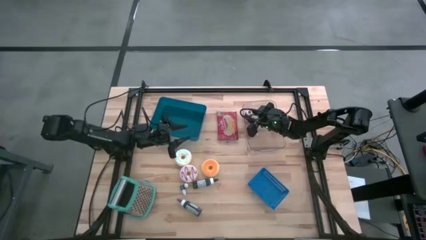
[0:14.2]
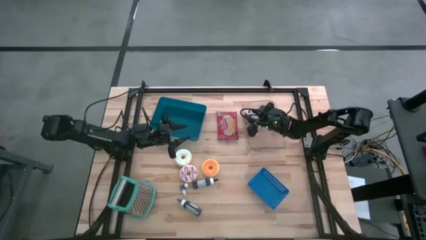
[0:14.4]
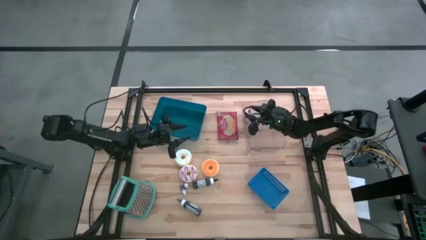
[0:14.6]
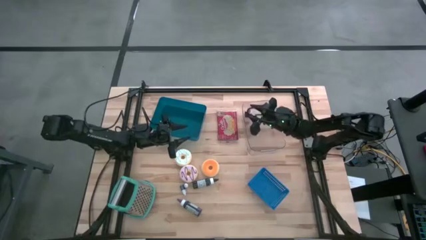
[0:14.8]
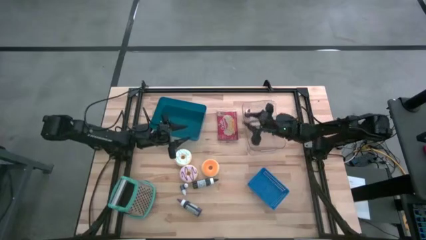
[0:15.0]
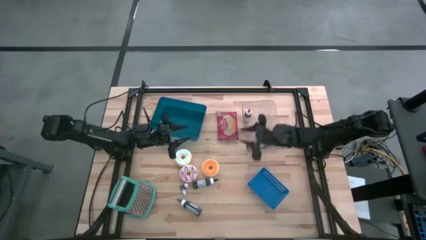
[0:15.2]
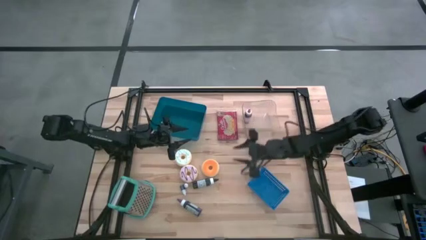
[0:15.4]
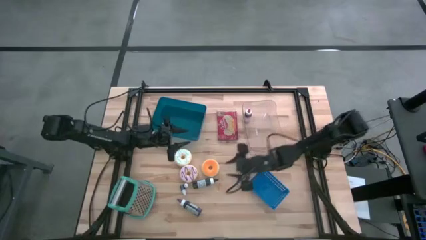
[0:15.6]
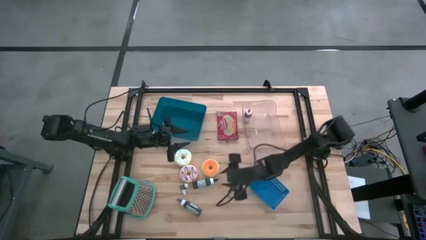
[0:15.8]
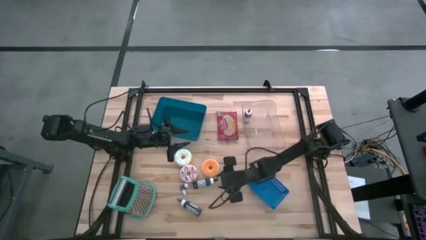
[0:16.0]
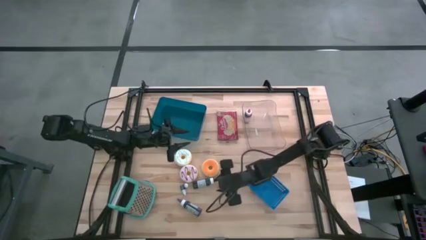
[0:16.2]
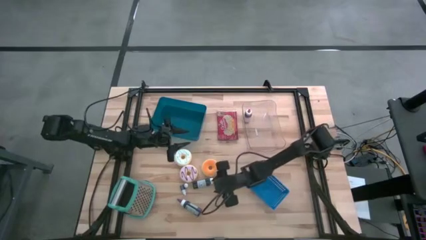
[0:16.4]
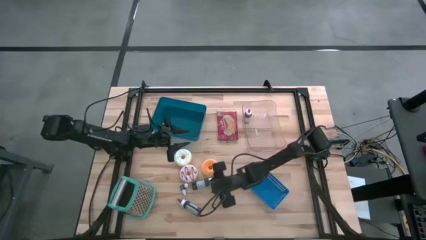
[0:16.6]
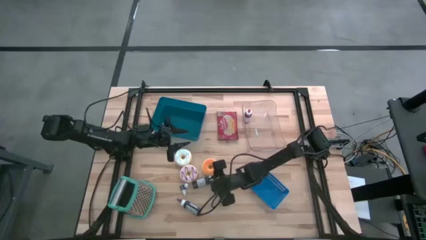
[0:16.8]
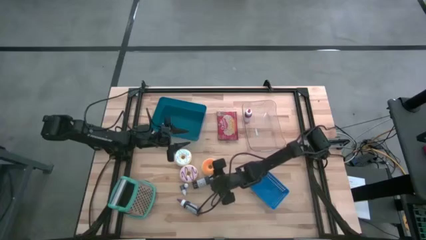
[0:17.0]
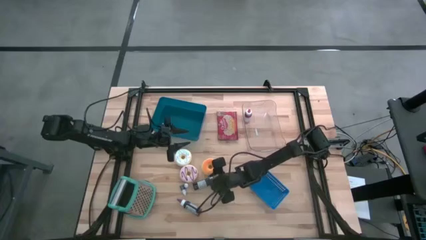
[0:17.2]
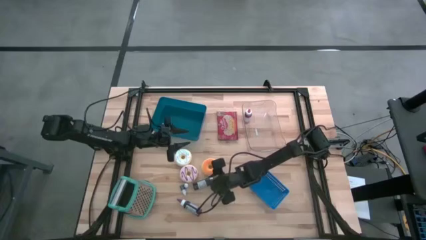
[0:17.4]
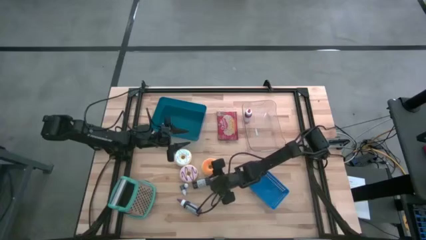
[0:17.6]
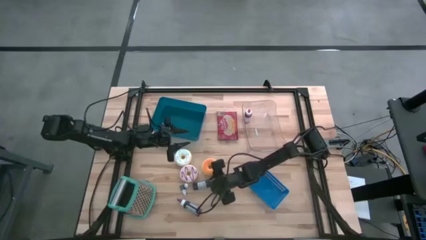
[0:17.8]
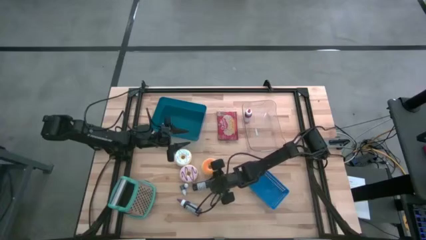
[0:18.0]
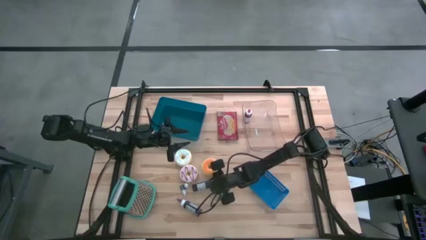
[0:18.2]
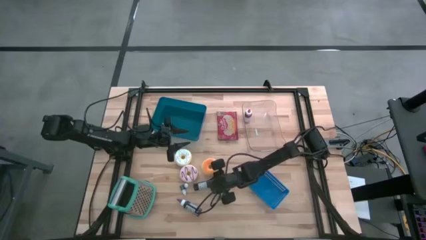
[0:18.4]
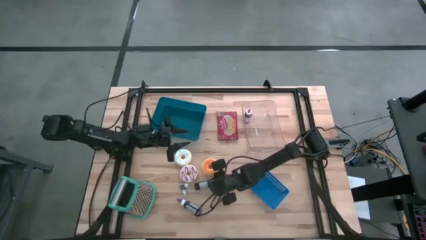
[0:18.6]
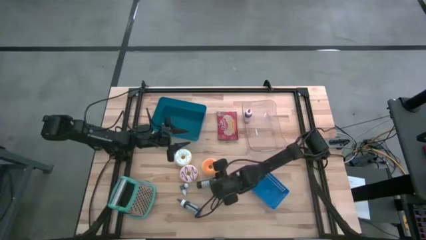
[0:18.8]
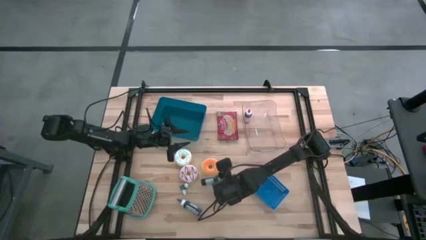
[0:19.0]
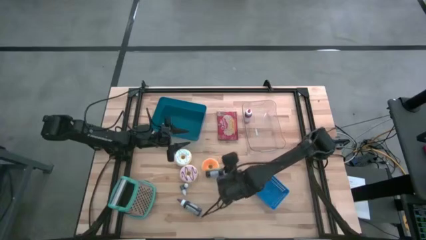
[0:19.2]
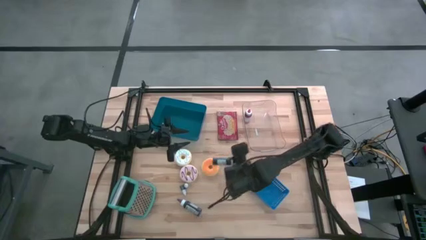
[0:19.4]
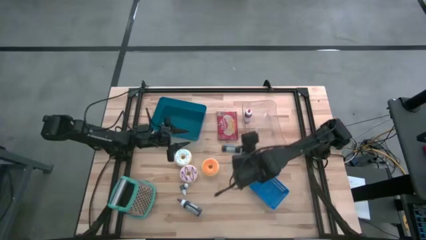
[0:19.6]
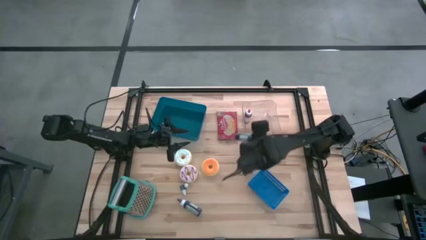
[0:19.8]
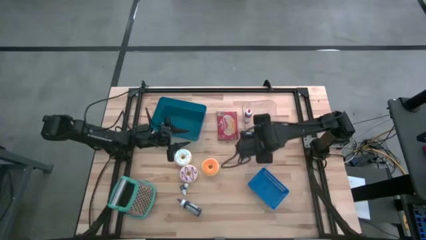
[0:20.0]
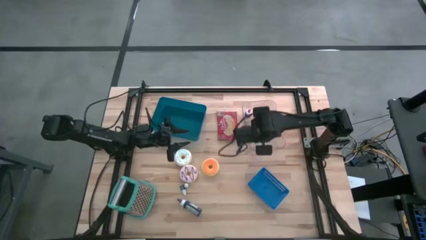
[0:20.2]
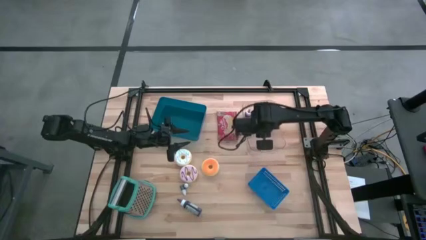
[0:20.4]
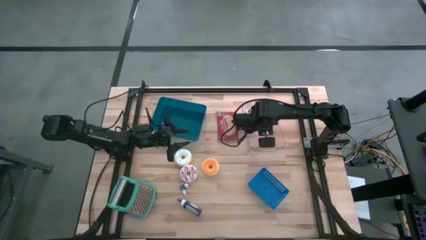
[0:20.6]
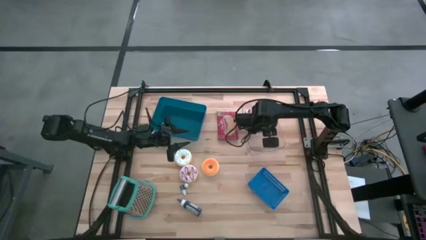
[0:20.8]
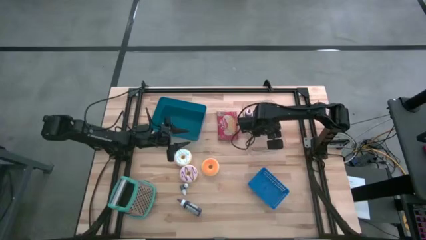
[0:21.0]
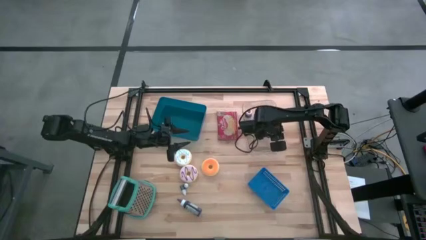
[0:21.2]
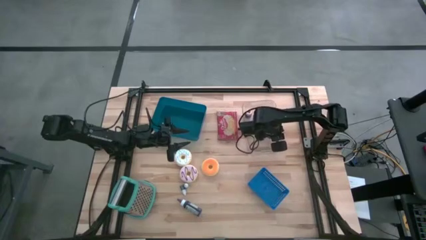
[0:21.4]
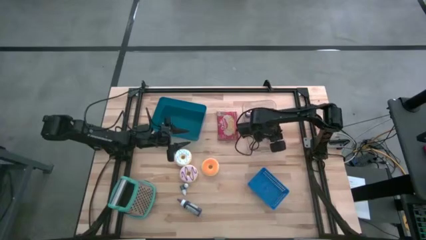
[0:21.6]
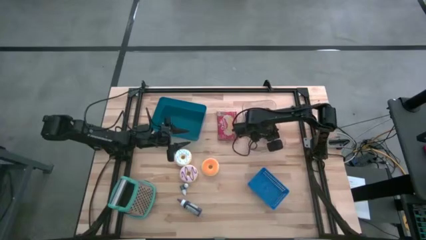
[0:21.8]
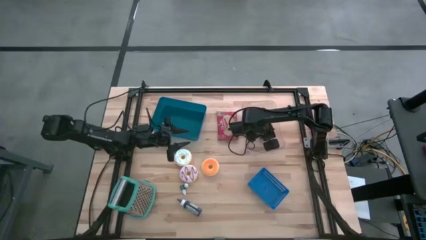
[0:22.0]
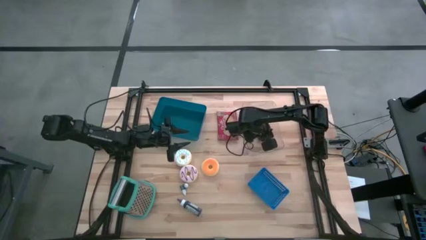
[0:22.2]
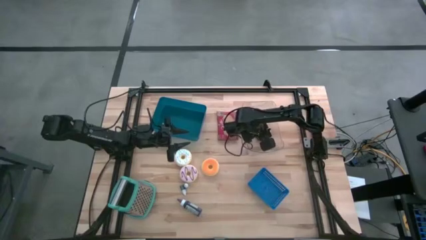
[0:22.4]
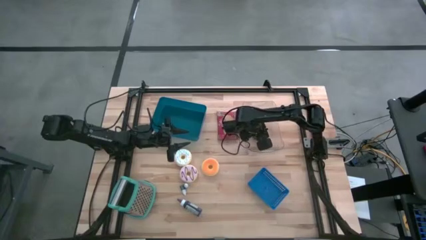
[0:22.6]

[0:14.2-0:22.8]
Task: Pick & Place Food Item
Put the black food coloring bottle into the transparent bin

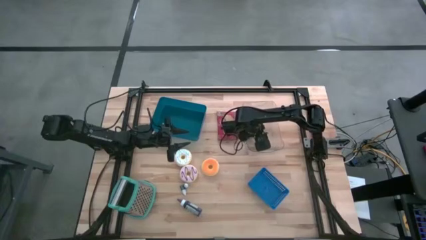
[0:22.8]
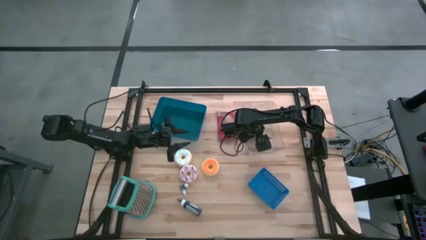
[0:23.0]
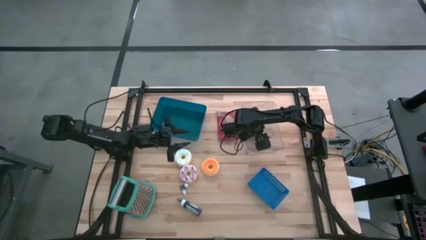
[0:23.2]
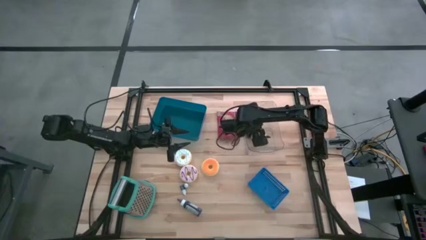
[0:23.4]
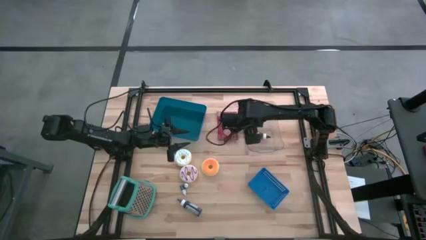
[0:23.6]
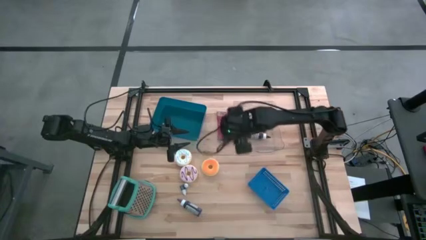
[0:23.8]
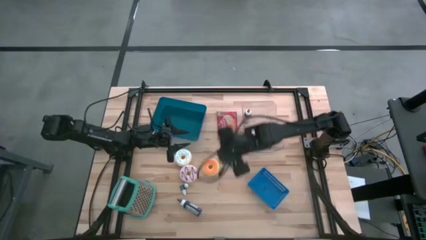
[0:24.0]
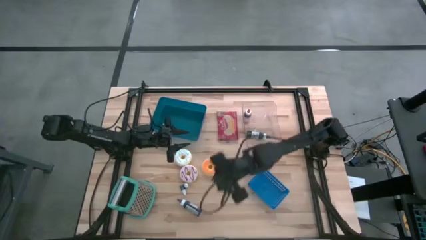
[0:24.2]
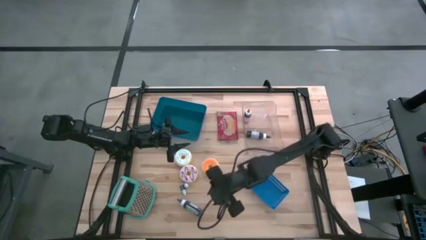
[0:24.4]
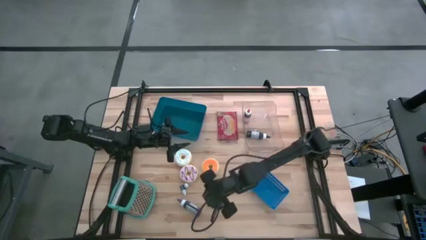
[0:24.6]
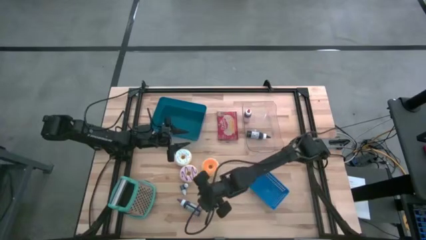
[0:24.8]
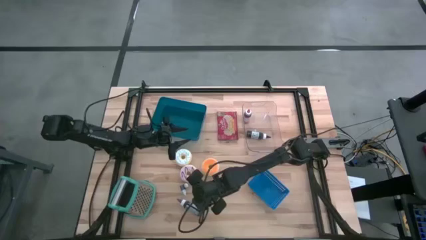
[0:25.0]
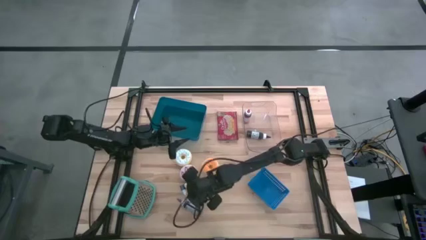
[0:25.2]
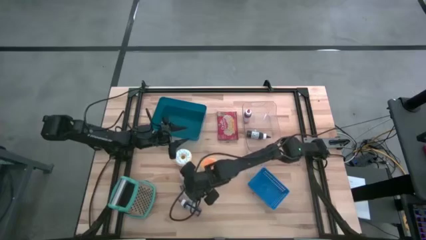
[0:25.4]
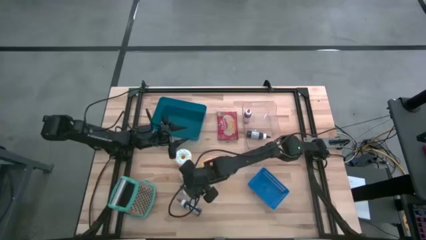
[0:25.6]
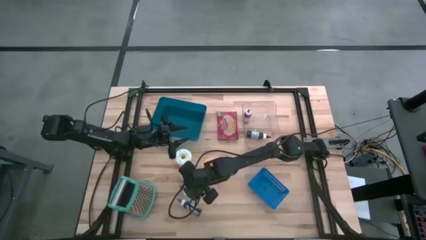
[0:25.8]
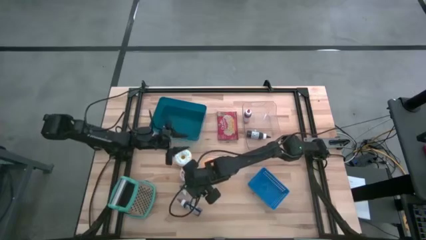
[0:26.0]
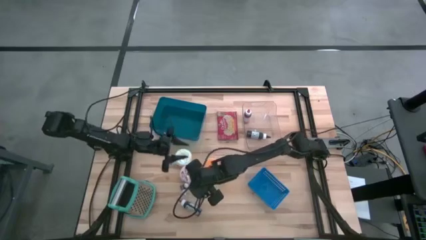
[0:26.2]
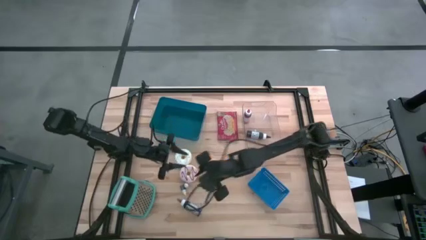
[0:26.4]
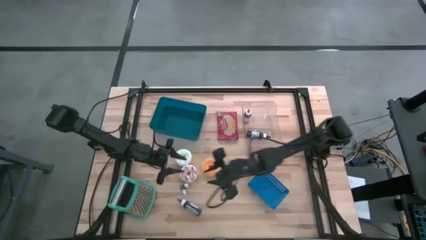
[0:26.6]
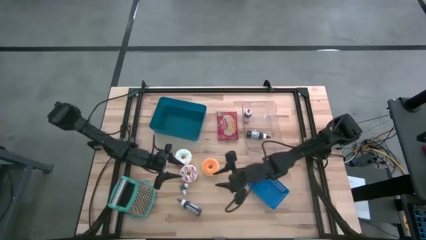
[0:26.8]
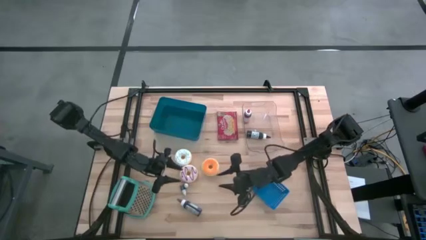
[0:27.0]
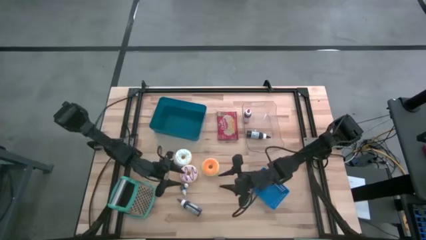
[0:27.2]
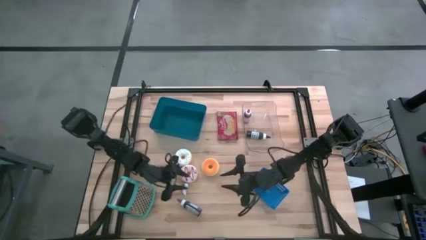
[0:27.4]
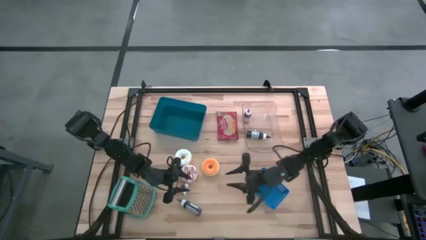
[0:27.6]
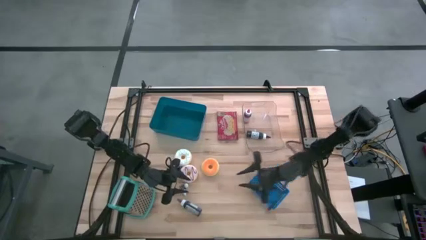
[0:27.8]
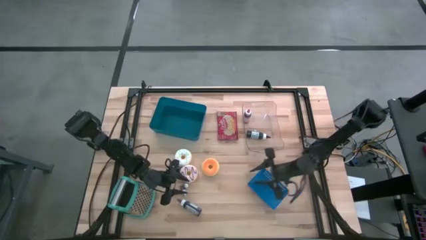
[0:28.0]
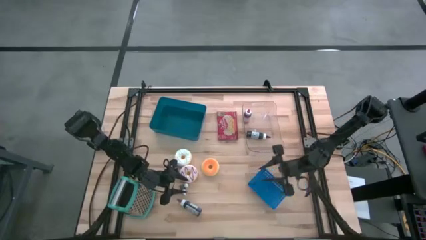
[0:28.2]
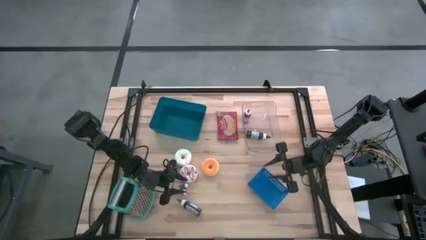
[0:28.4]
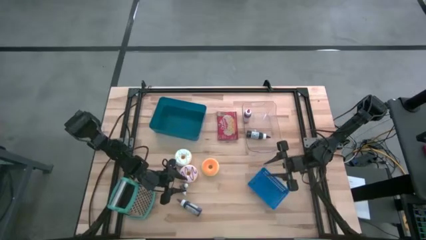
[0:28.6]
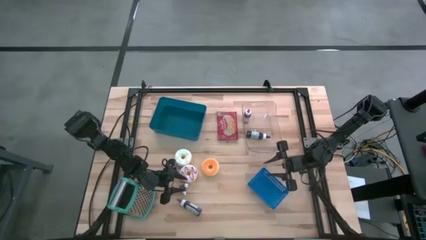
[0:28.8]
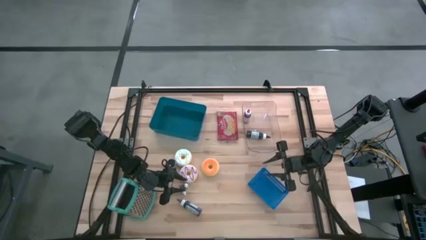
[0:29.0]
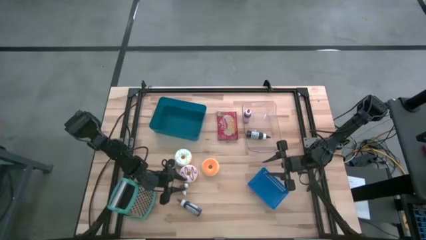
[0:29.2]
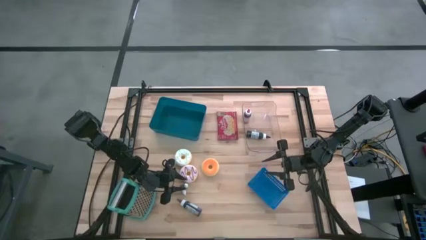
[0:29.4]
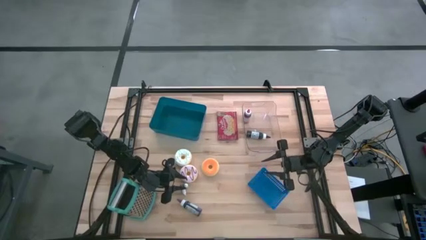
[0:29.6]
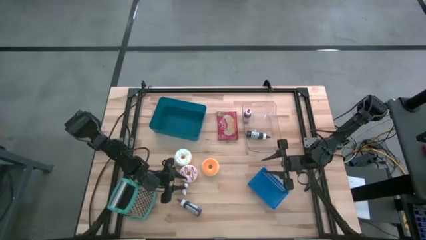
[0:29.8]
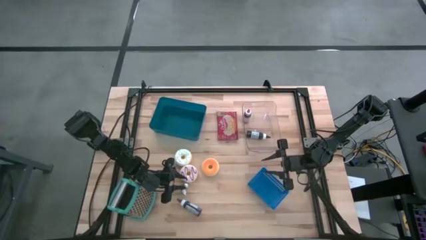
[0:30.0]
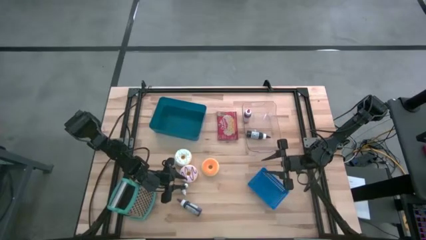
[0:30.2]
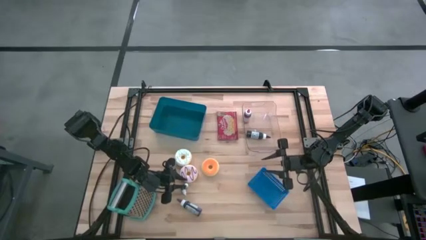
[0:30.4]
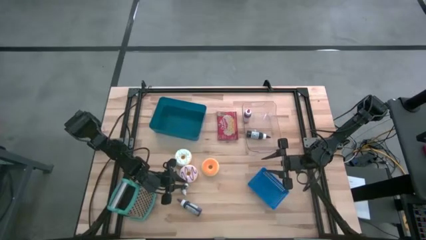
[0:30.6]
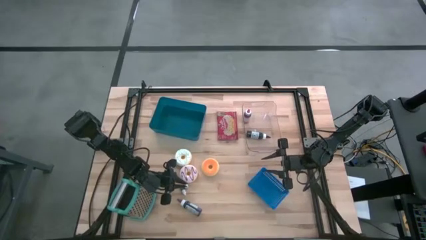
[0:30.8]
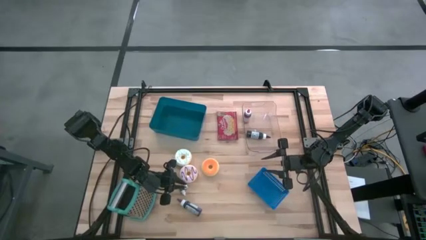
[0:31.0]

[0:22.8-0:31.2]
Put the top small purple food coloring bottle into the transparent bin
